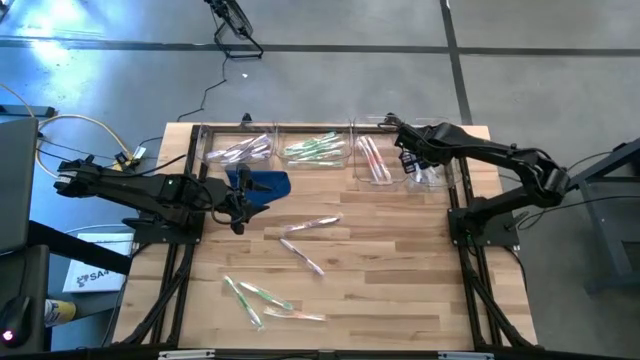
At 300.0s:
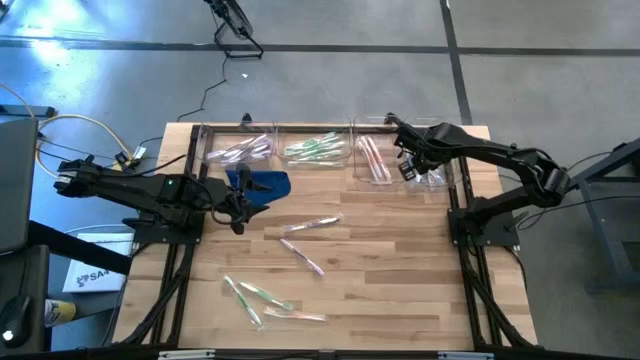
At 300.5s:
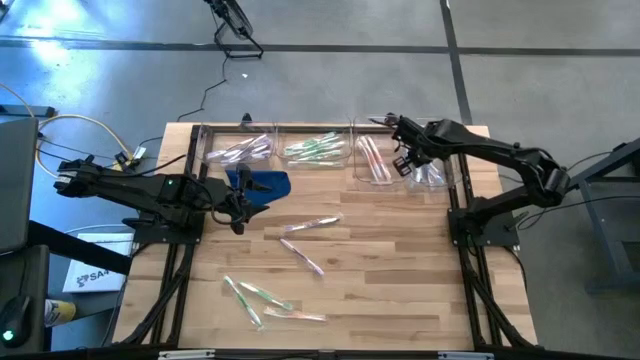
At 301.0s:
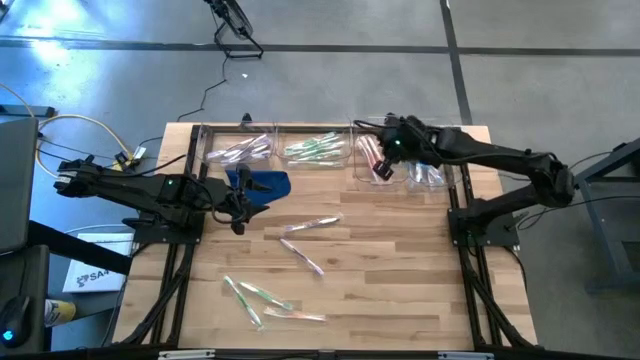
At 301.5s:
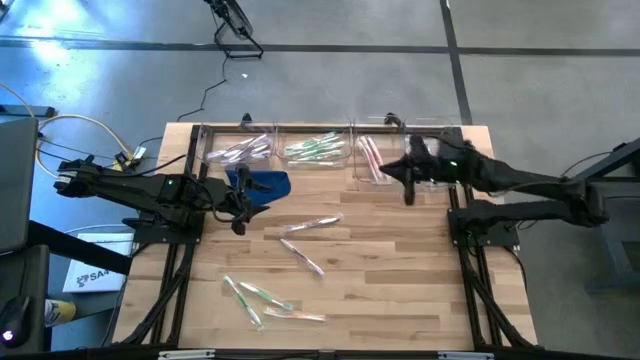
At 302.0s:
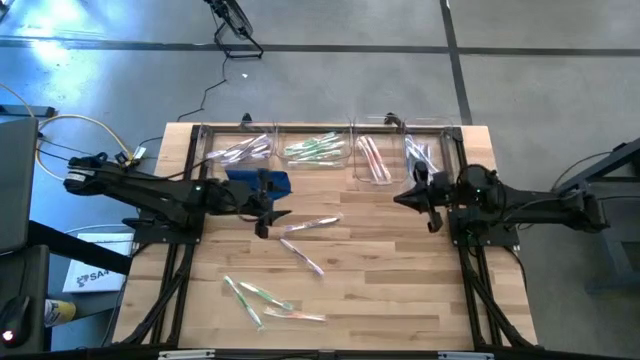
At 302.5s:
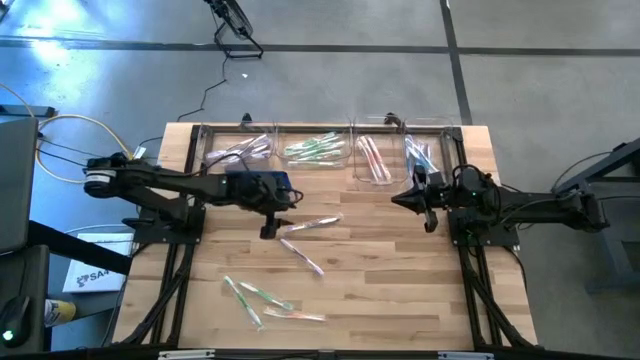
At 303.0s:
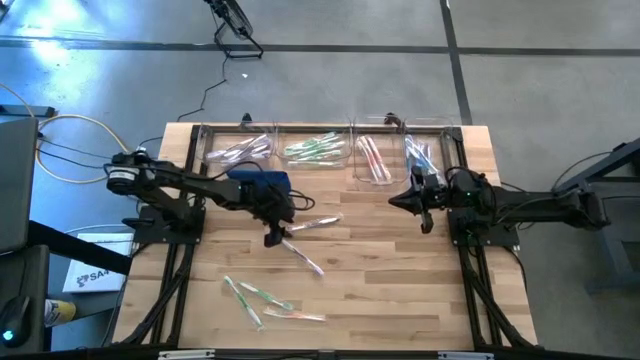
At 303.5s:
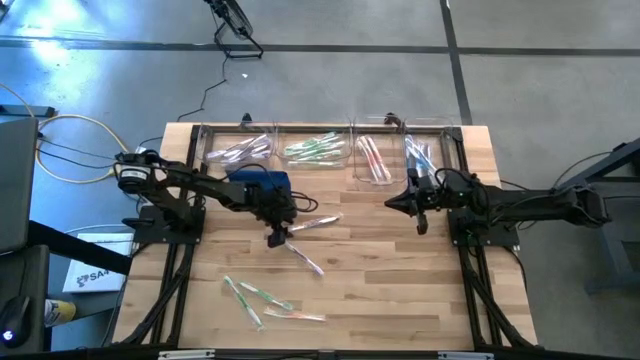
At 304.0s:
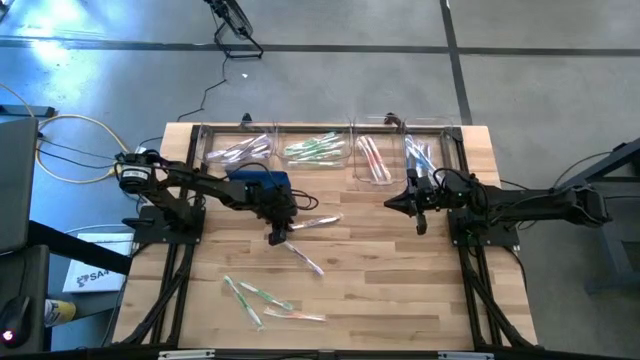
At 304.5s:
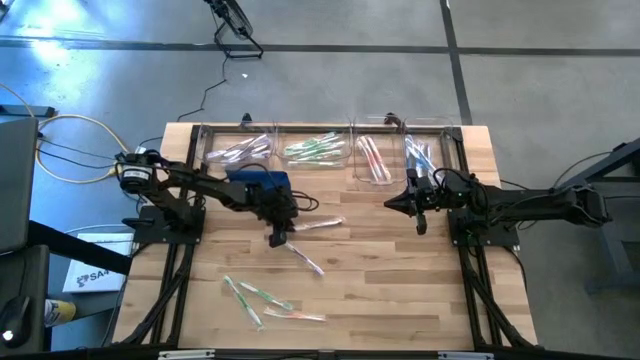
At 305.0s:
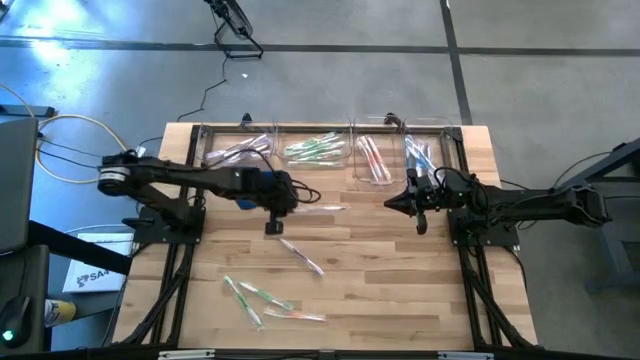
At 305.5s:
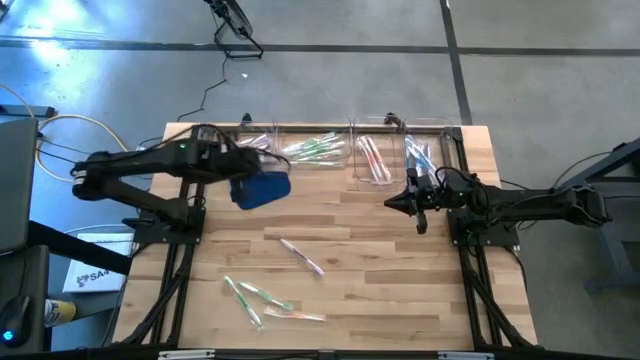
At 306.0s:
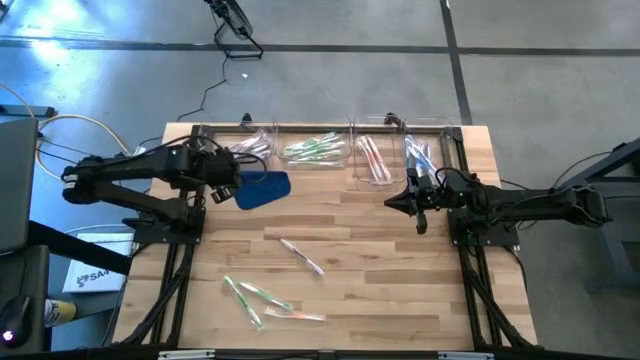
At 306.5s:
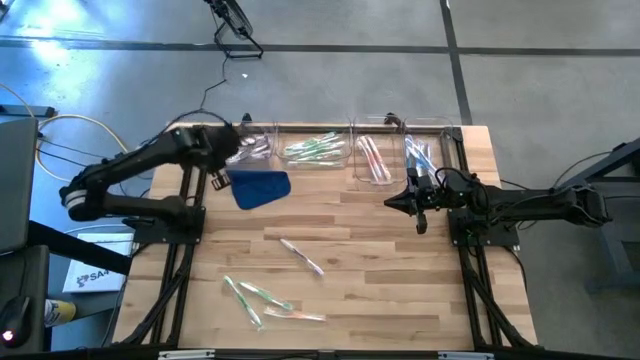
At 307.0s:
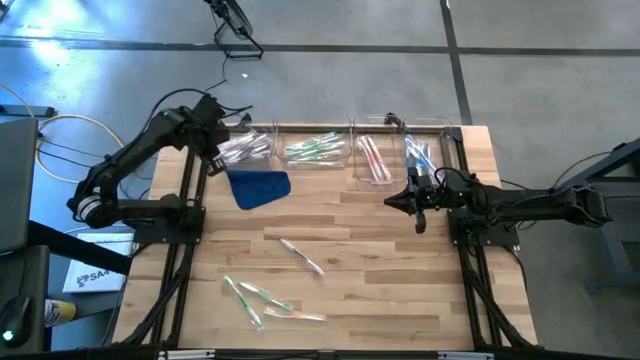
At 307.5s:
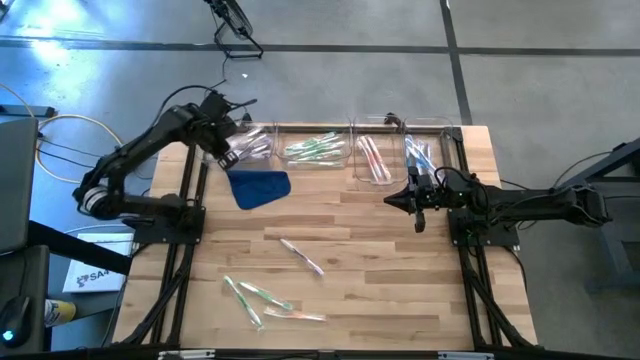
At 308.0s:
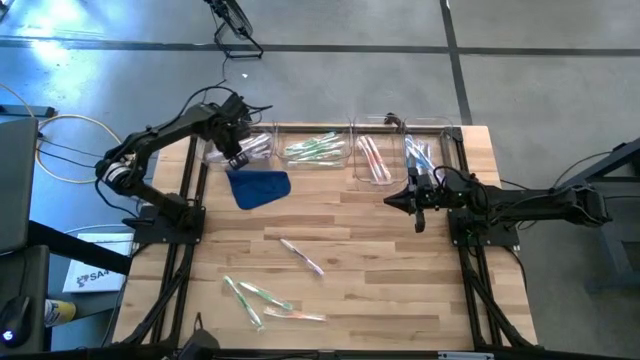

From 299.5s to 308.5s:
Task: Pick & Place Toothbrushes
Put the violet toothbrush into the left transparent bin

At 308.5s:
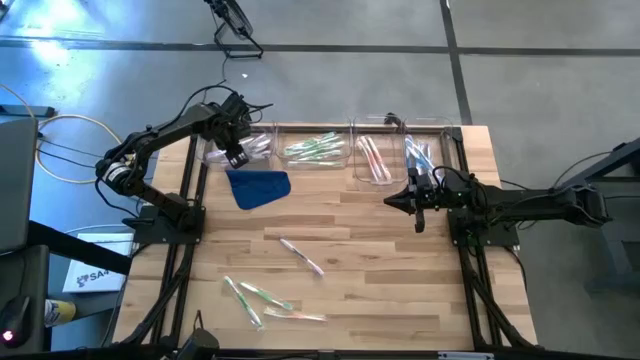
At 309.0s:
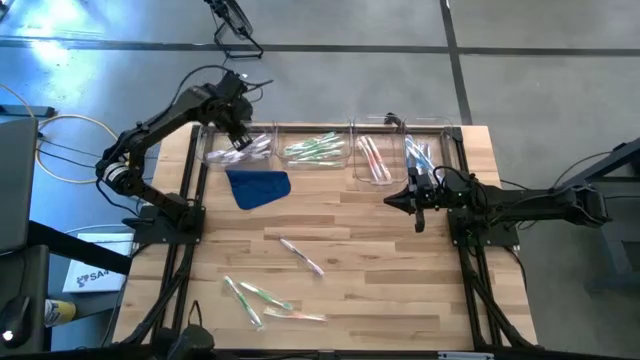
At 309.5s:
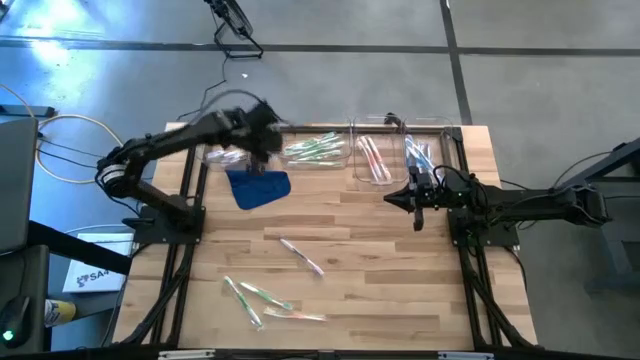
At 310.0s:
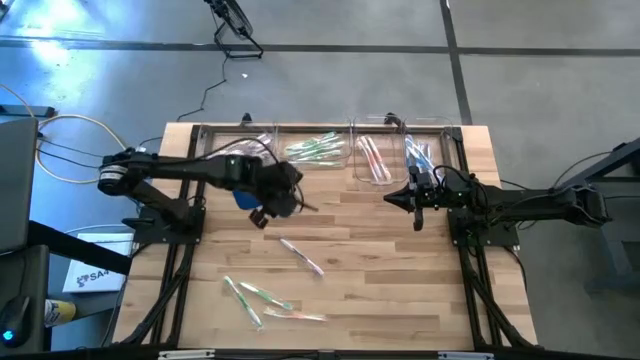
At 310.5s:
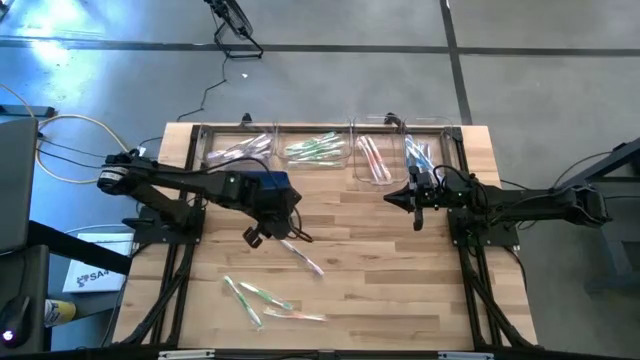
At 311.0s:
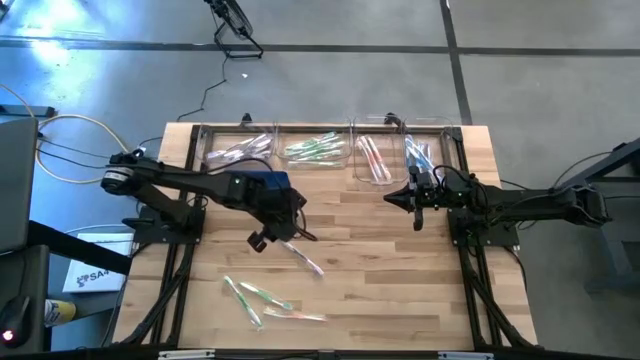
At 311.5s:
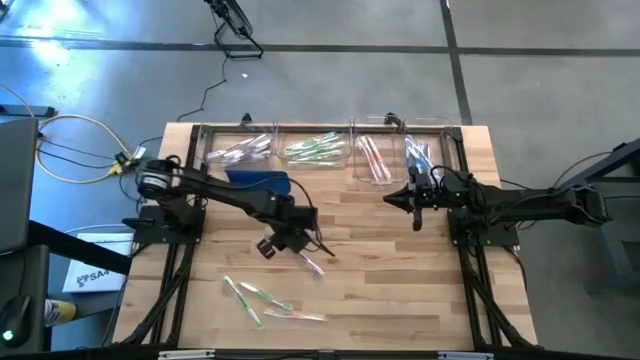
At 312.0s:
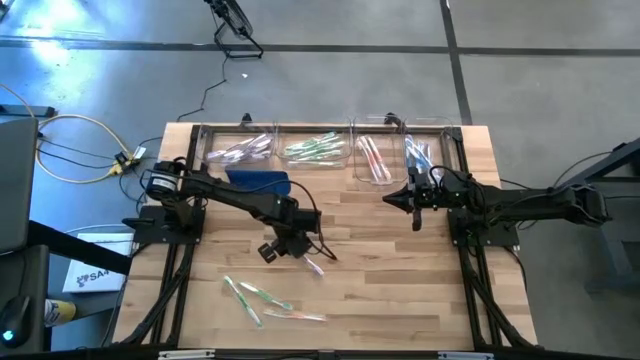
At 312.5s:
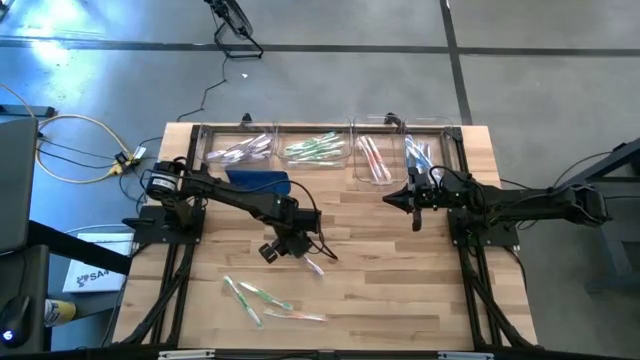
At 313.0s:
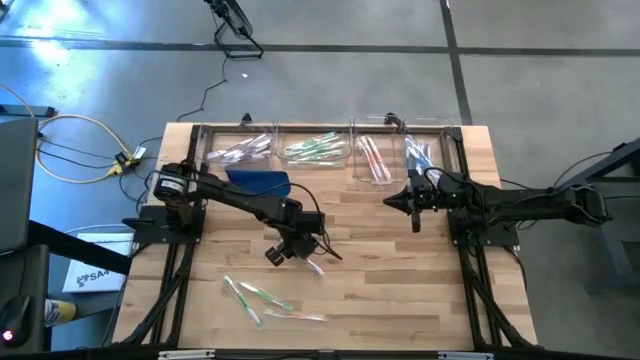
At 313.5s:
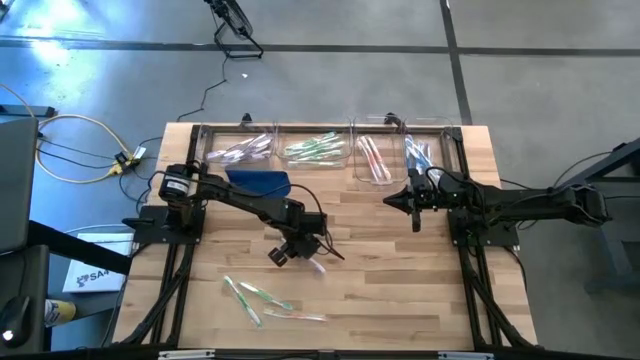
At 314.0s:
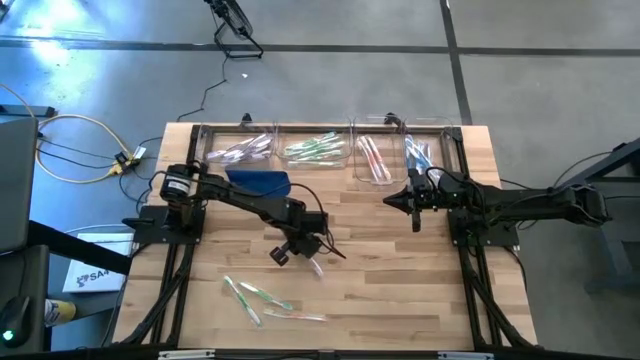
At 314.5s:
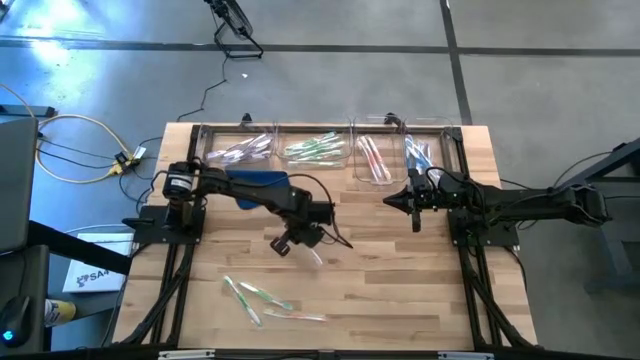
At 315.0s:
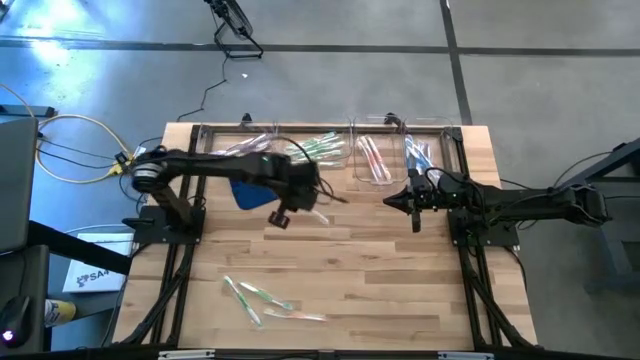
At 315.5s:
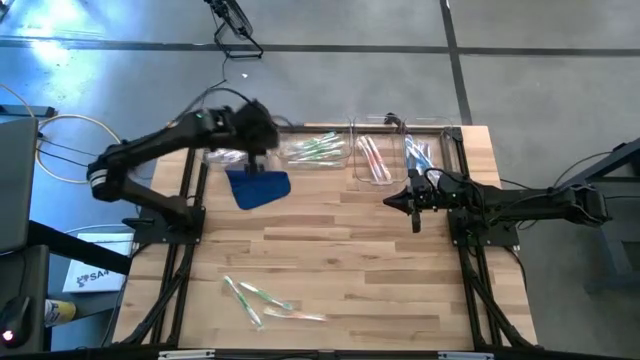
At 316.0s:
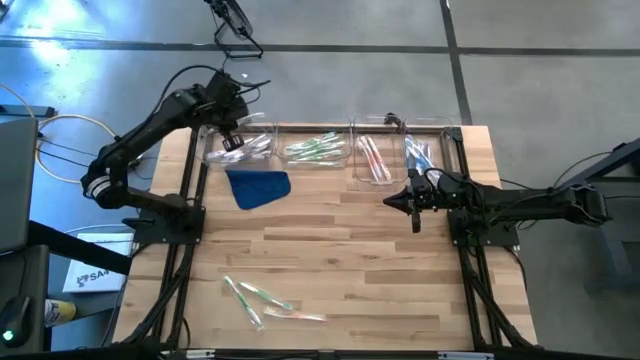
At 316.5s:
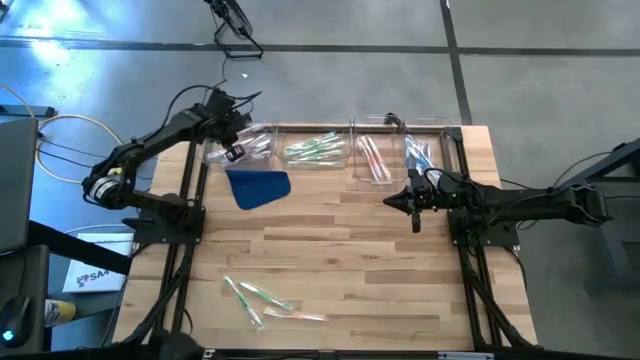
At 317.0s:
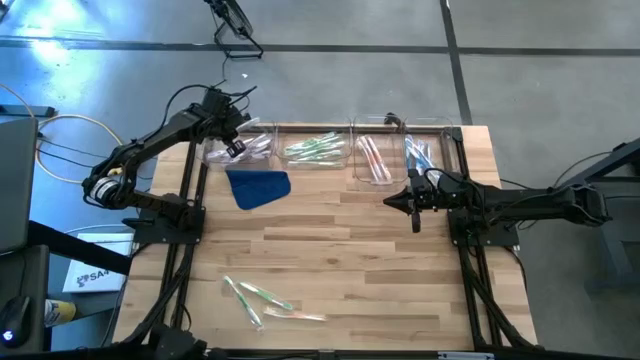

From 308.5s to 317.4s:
Put the violet toothbrush into the left transparent bin

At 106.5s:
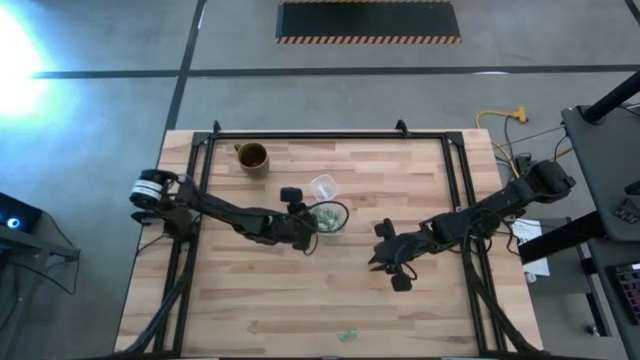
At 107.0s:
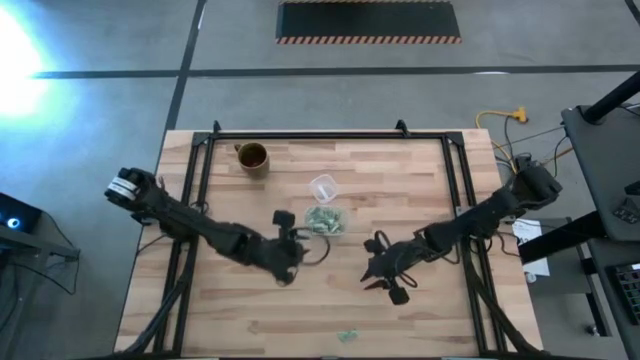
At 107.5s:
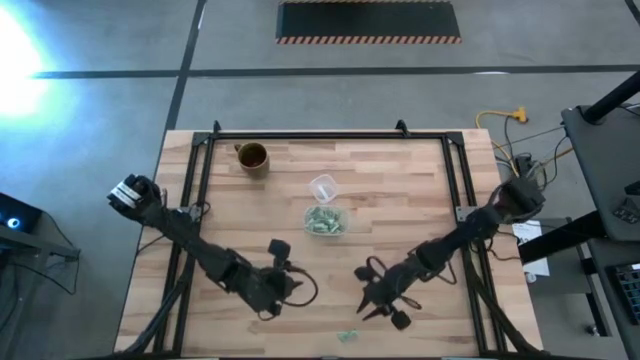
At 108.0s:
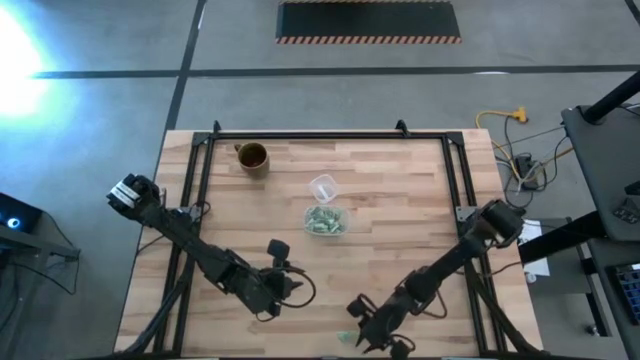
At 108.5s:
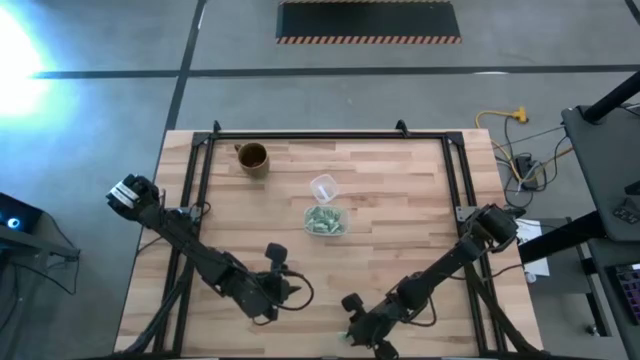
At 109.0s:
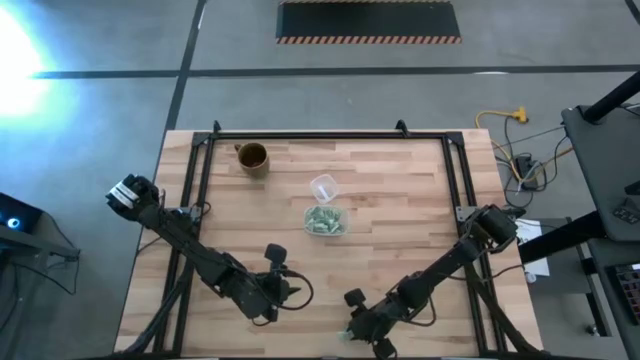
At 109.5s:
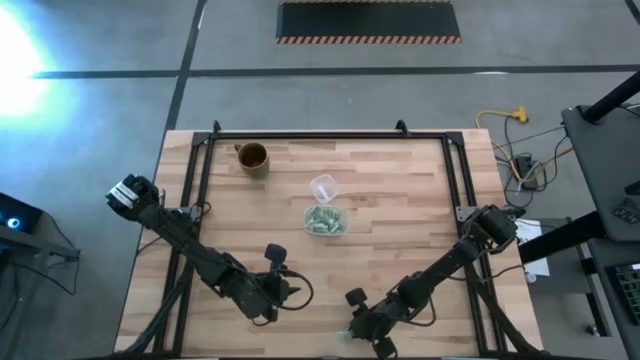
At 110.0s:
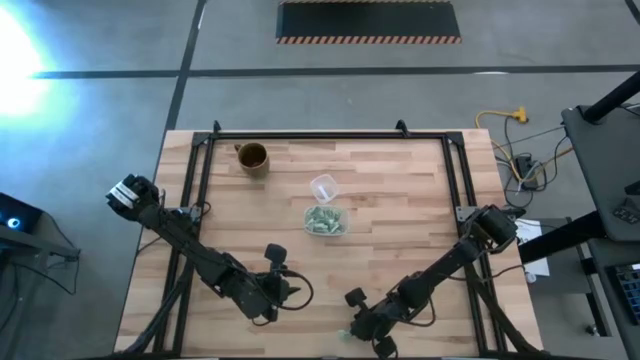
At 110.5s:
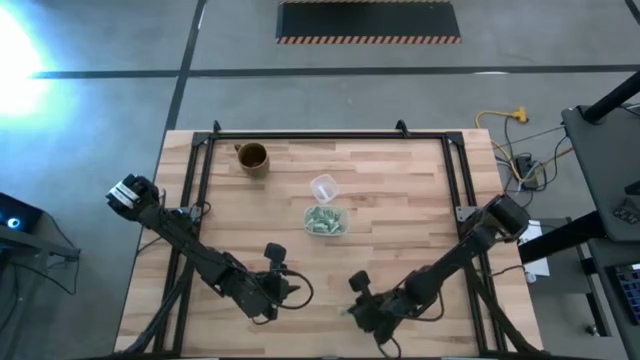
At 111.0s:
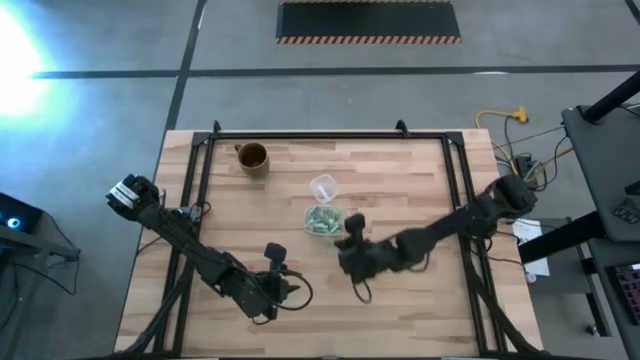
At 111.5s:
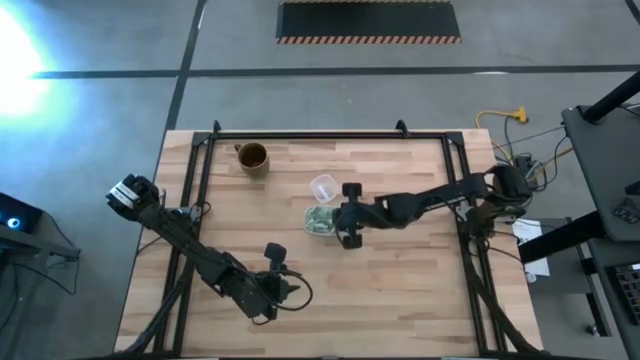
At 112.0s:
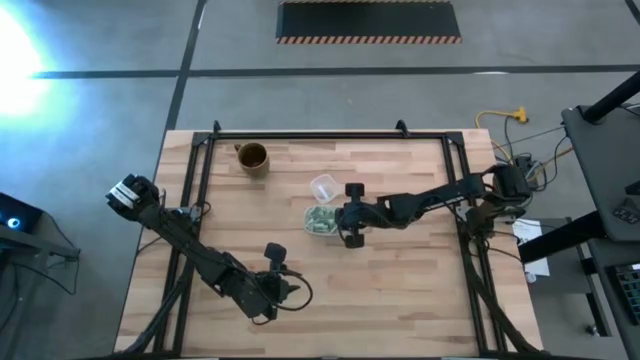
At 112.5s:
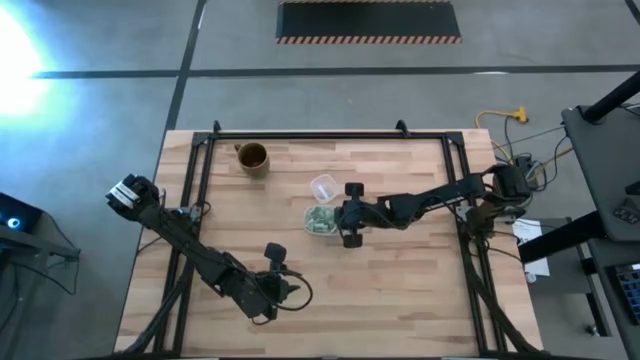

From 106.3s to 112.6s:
Task: Pick and place Stevia / Truvia into bins
Put the stevia packet into the bottom transparent container
